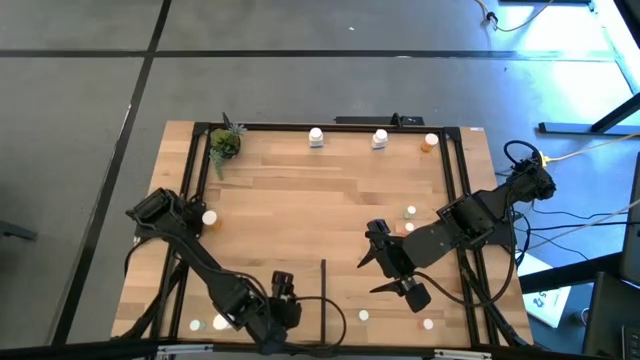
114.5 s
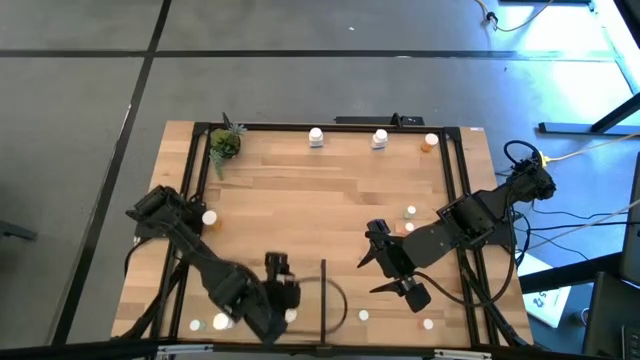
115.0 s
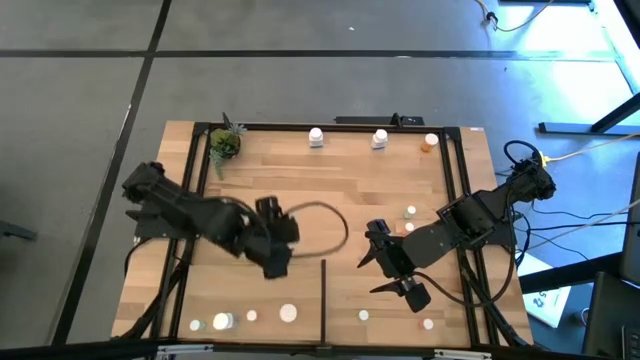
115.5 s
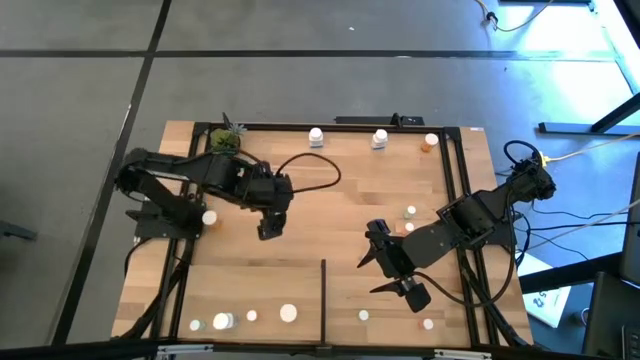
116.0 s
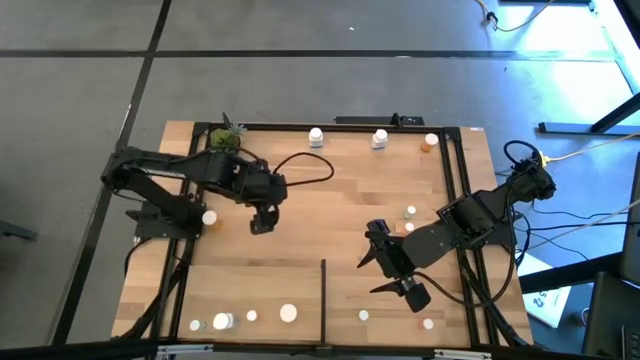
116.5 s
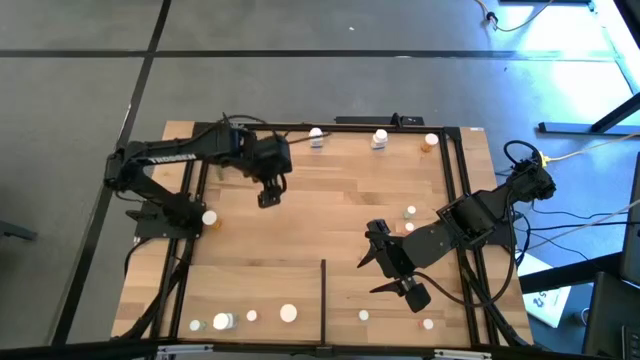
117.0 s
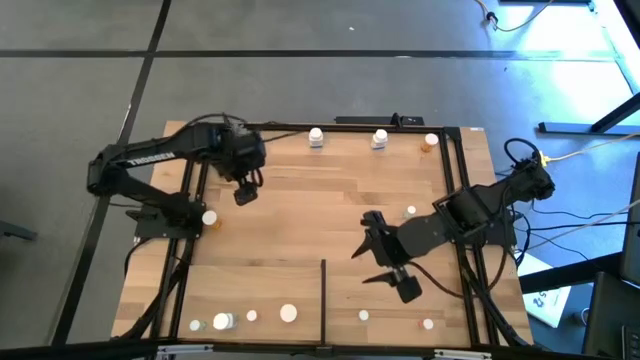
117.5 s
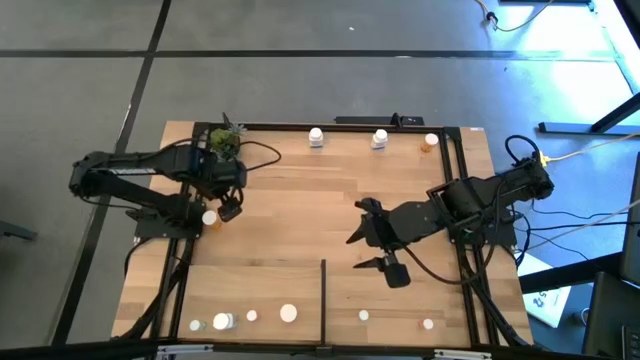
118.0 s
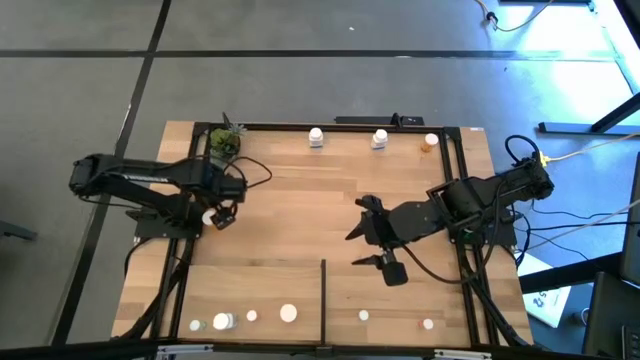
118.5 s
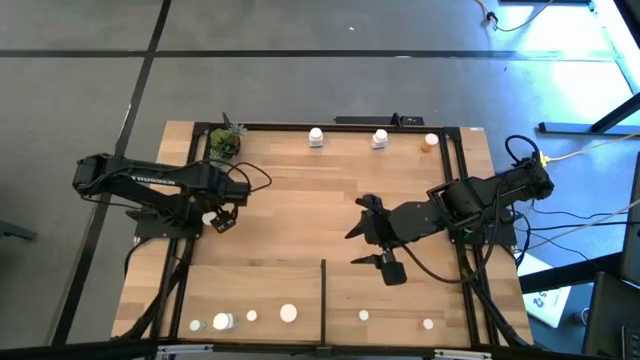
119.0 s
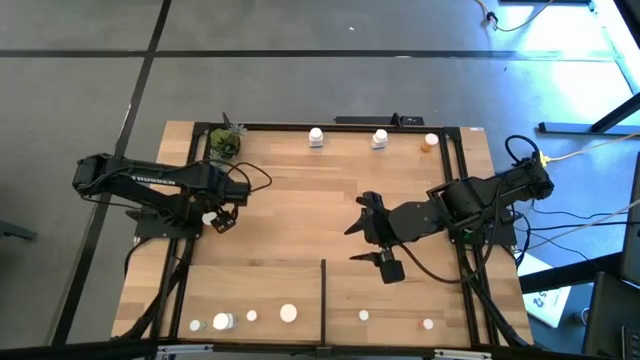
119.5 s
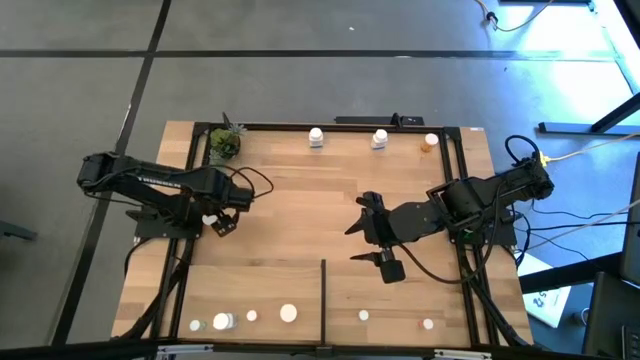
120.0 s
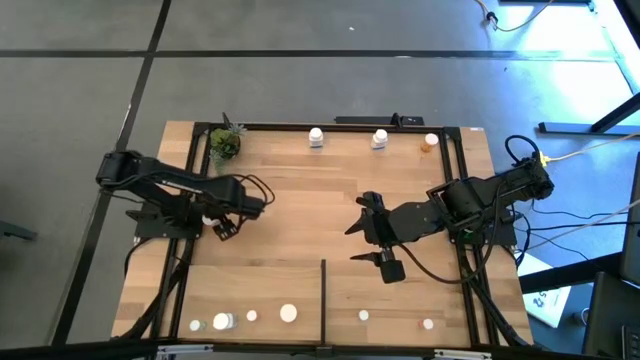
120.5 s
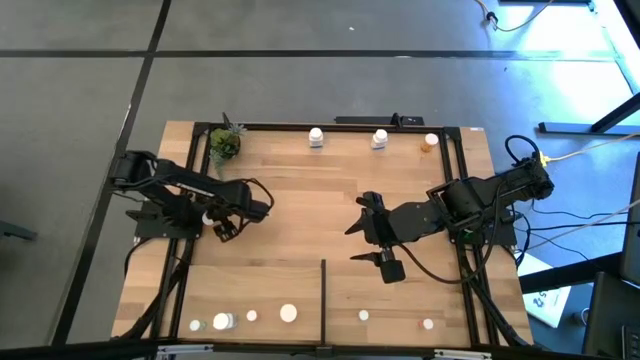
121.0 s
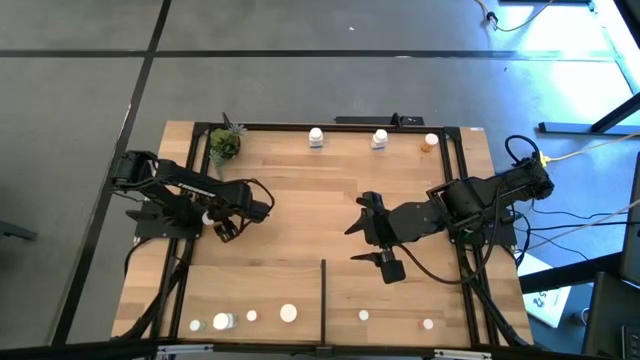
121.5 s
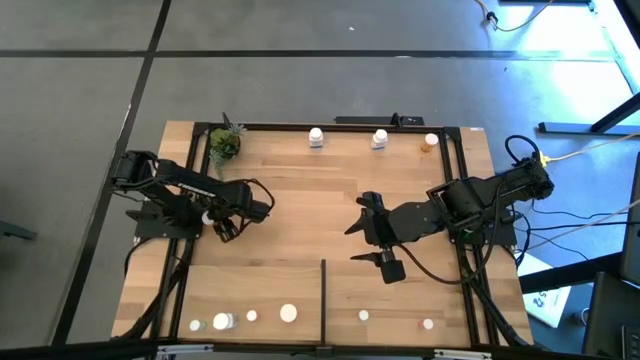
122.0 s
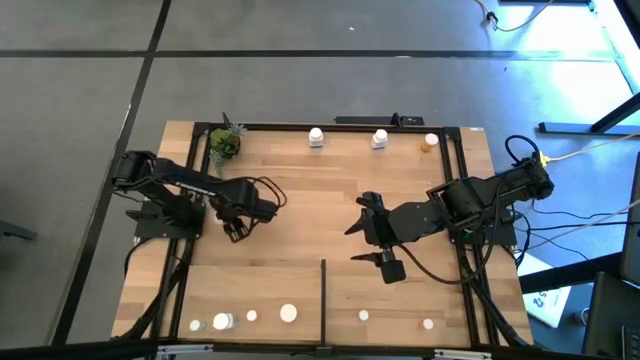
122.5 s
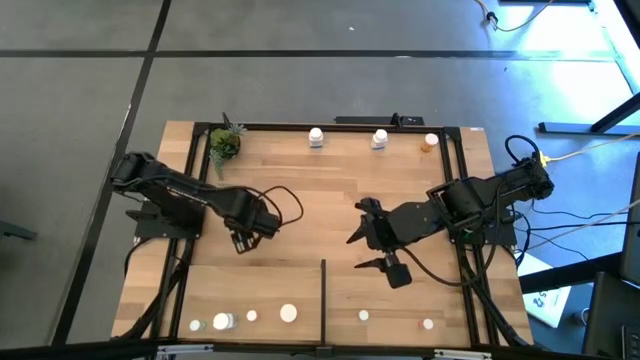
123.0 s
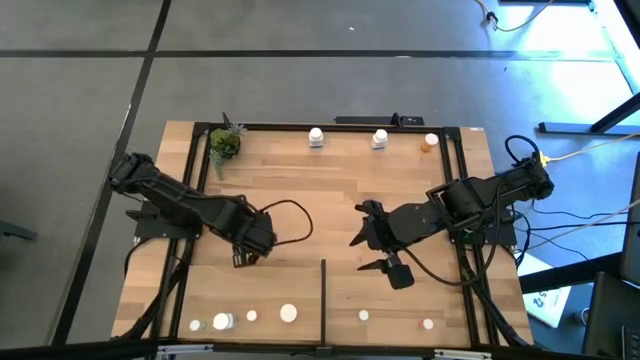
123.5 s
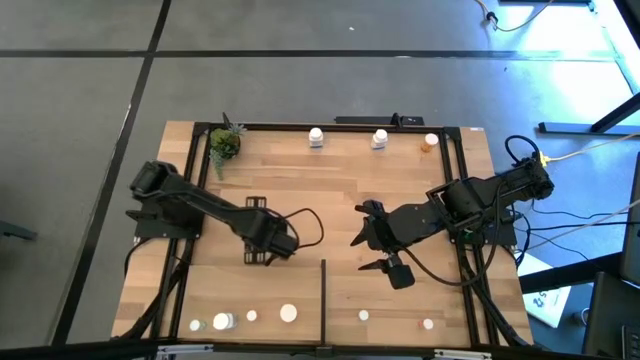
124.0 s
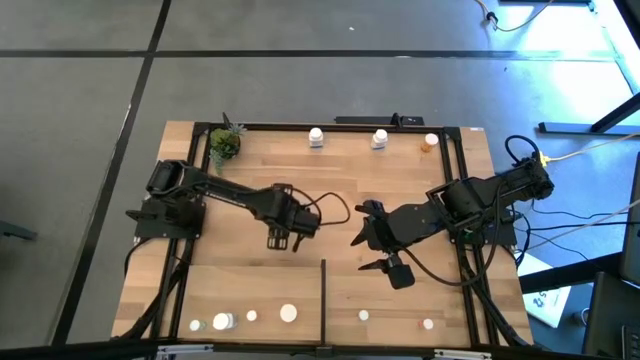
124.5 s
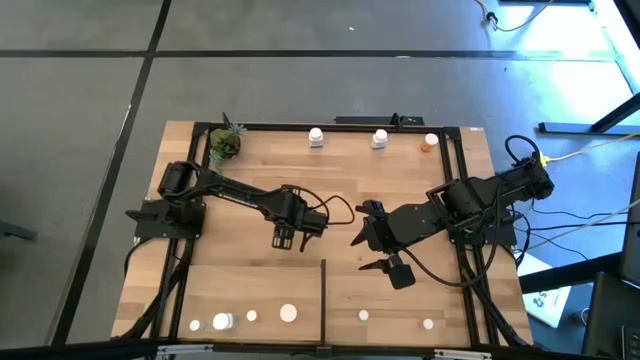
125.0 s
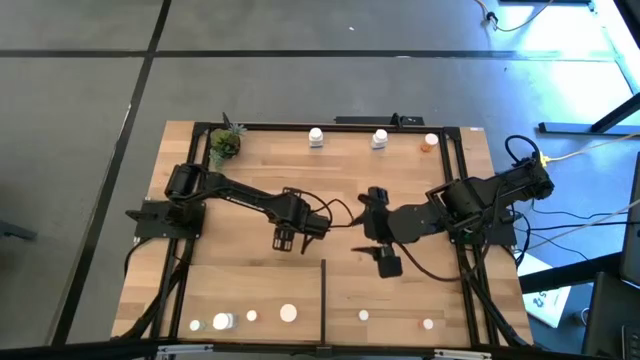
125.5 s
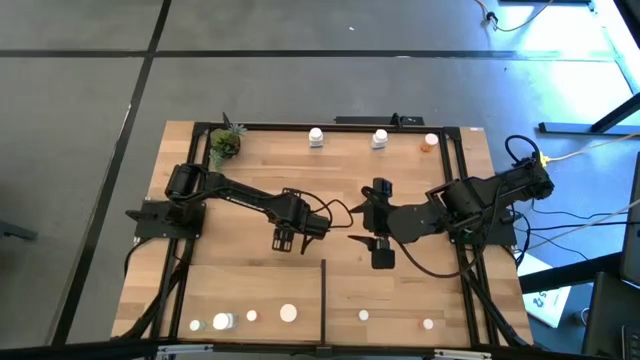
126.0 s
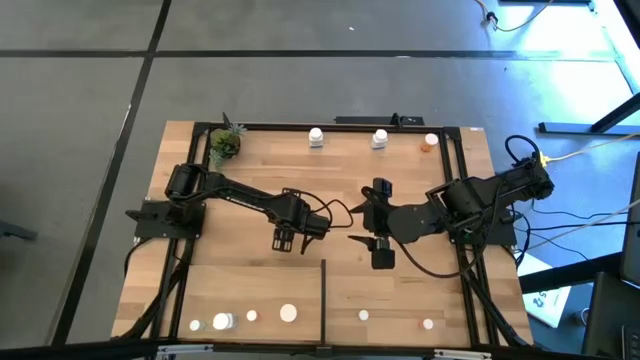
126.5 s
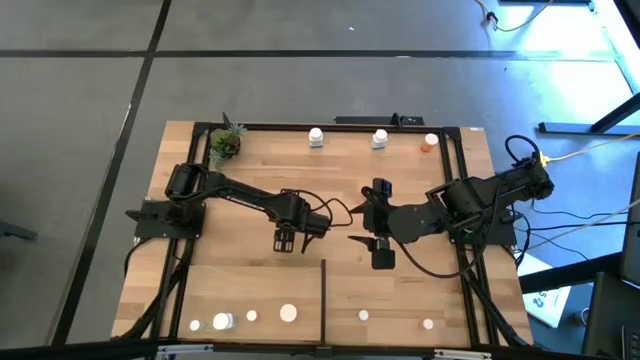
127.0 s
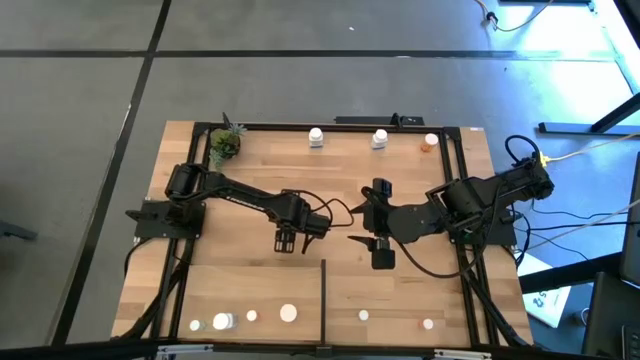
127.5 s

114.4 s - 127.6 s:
Task: Pick and place medicine bottles onto shelf by color
Put the bottom orange pill bottle on the shelf aligned with the other orange pill bottle

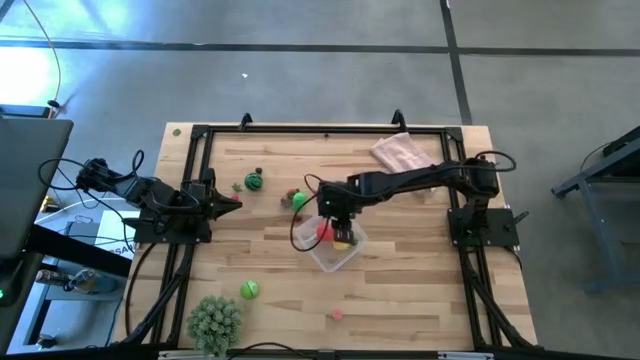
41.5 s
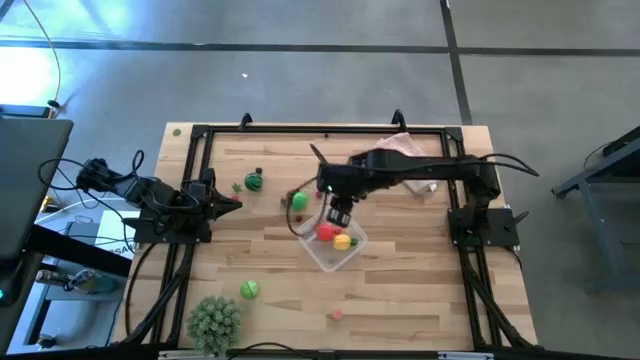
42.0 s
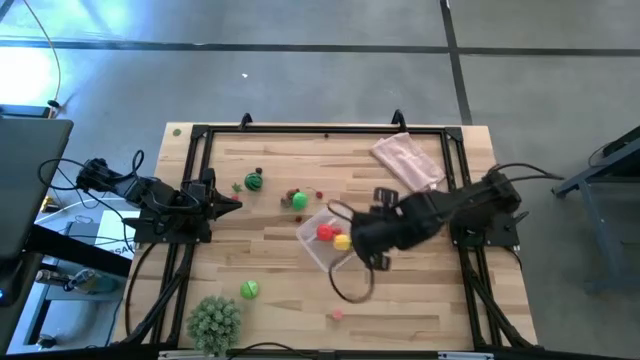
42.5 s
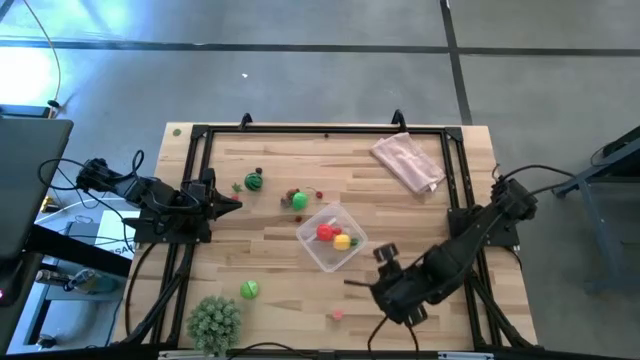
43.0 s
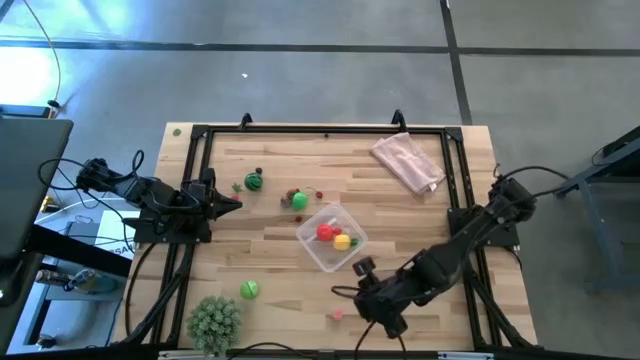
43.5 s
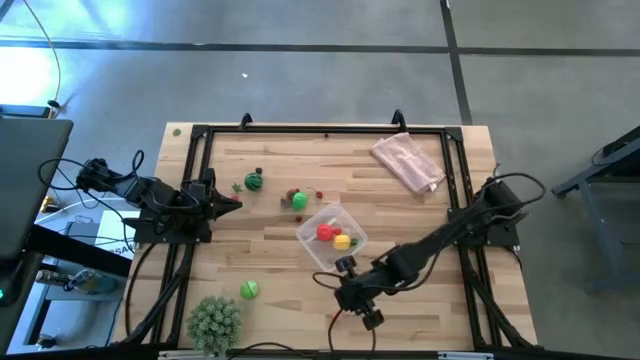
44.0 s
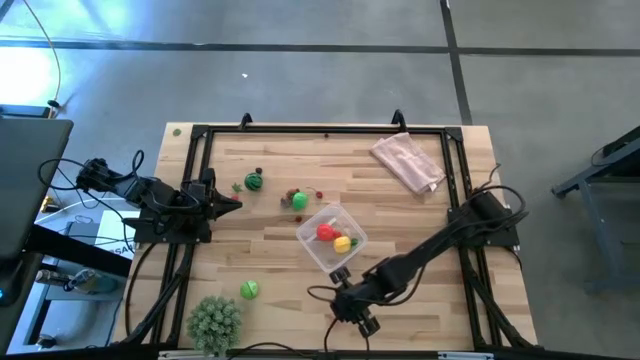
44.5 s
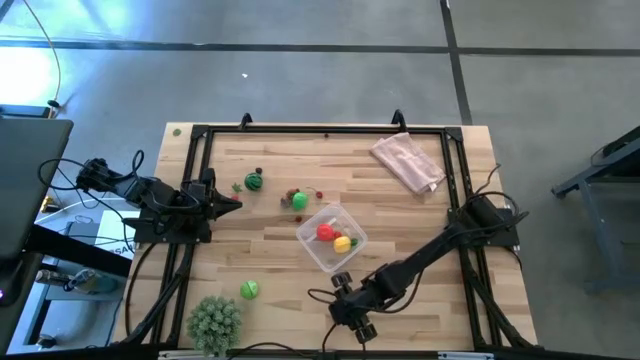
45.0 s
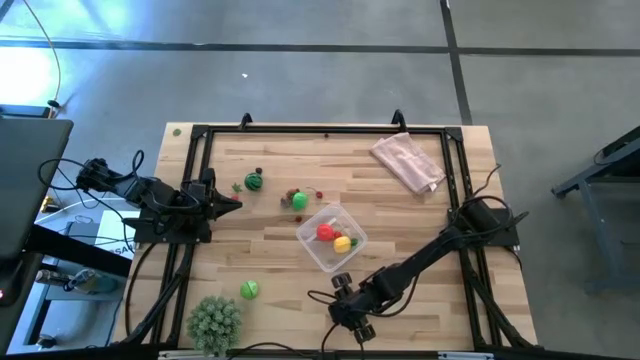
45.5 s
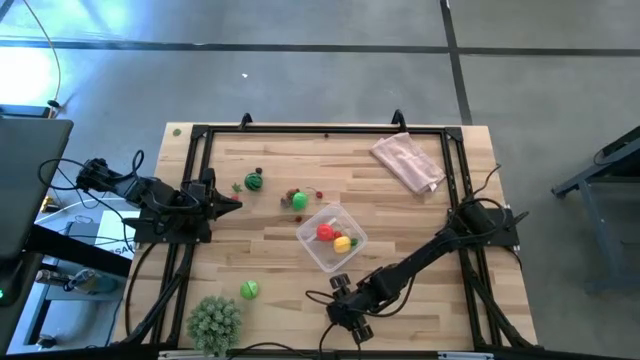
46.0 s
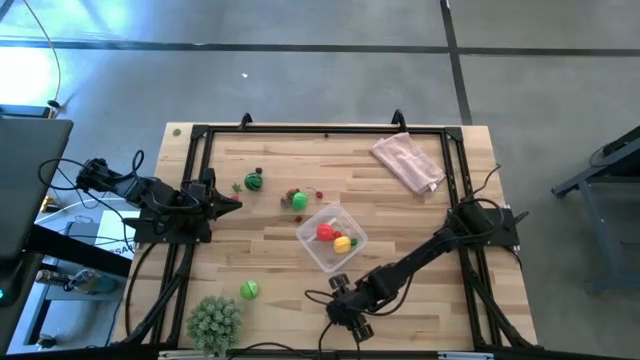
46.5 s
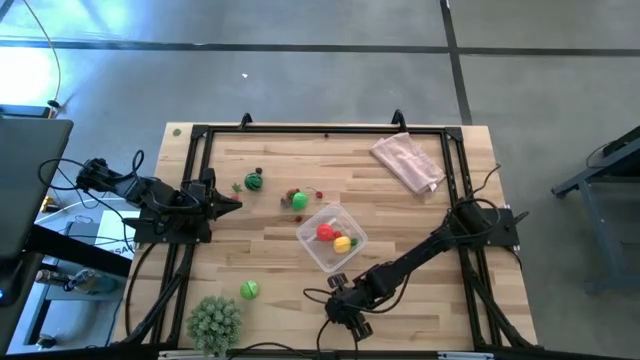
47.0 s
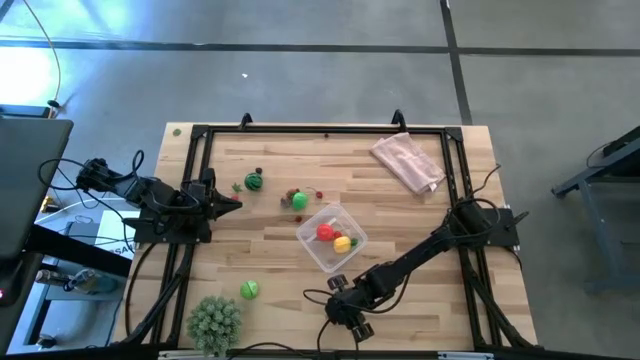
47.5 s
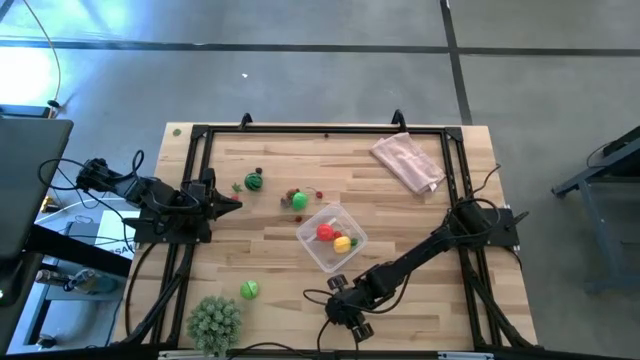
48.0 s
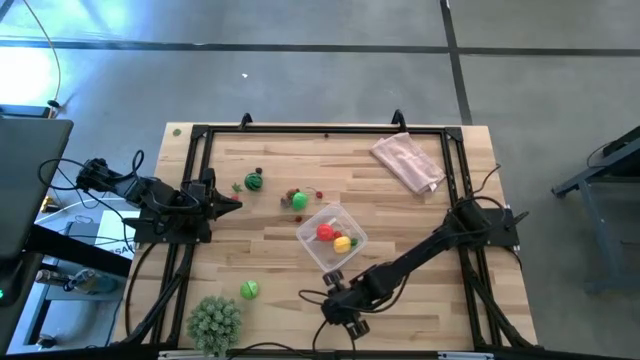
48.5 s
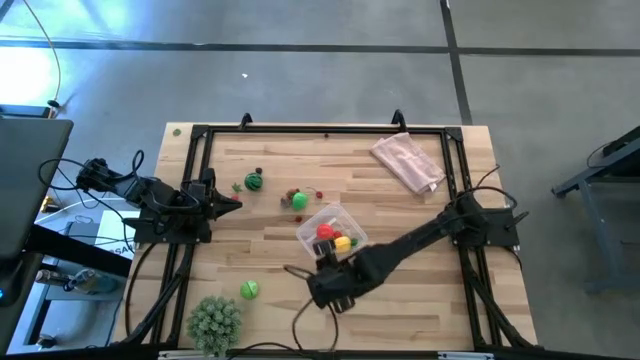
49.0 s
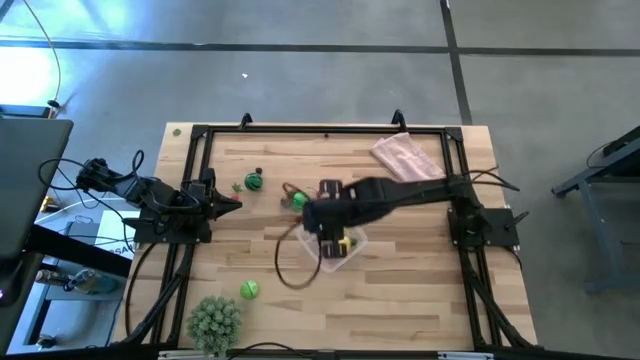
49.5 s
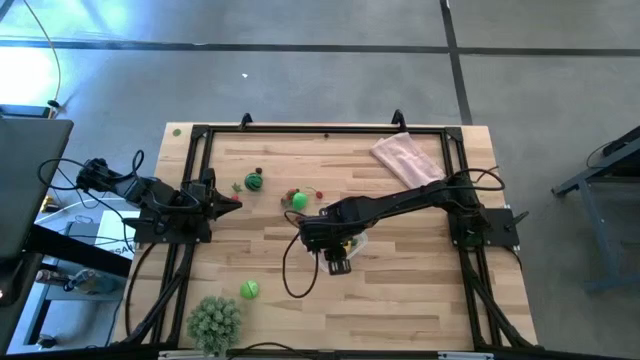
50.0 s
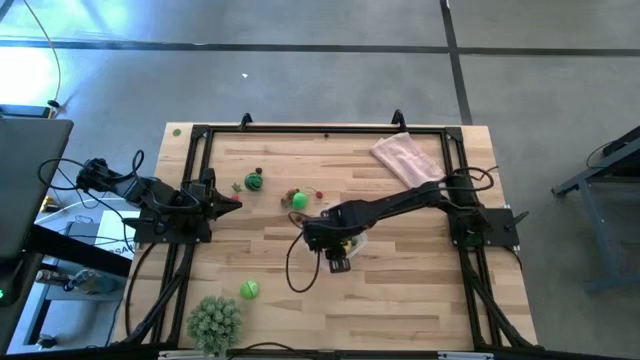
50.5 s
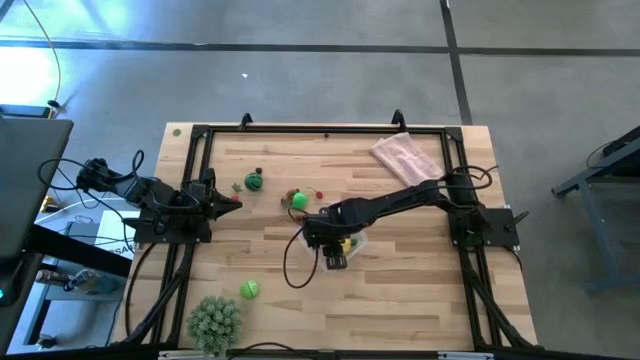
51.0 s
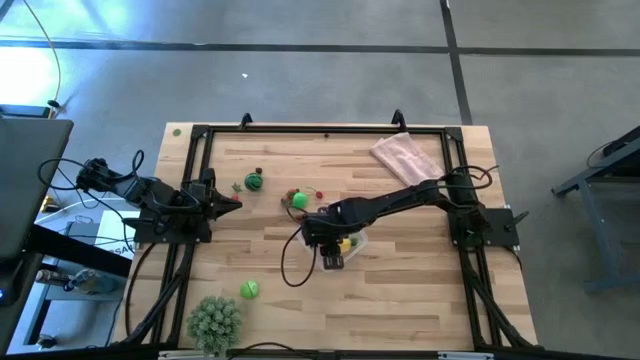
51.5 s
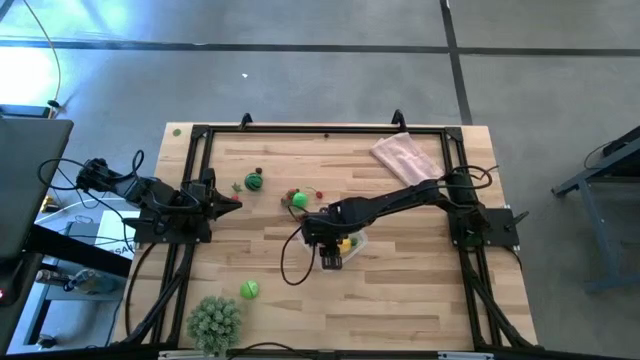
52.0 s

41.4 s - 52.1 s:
Task: Pick and placing Produce into tupperware
Put the pink peach into the transparent container
